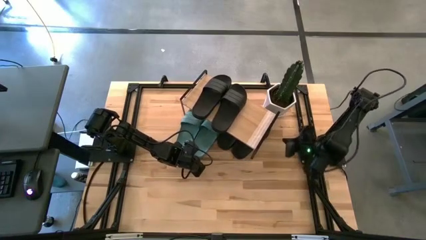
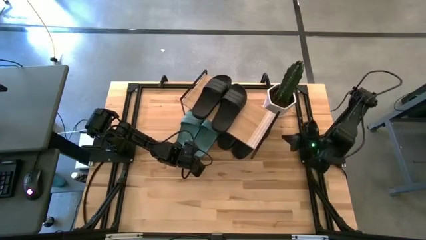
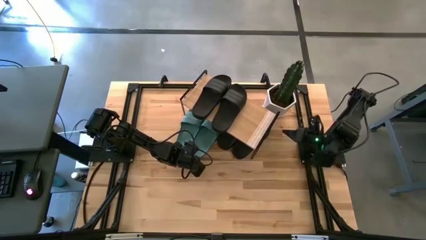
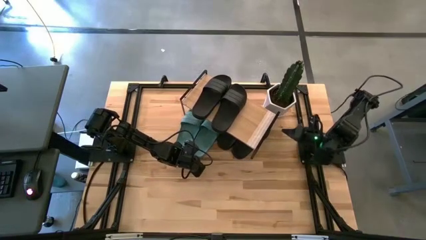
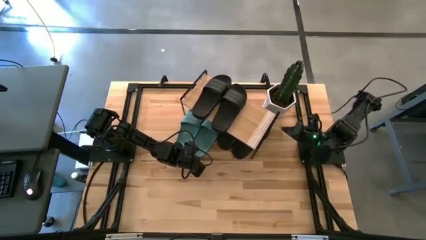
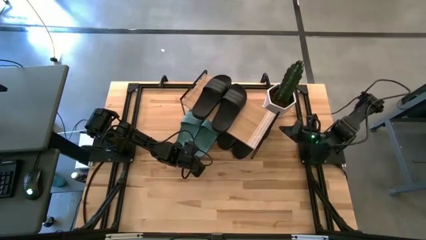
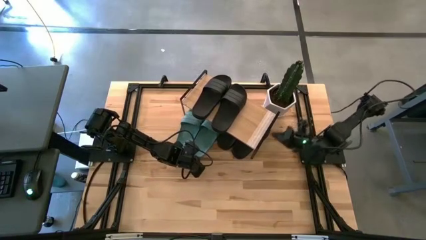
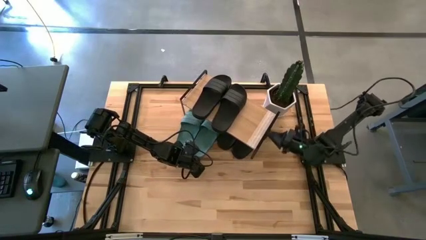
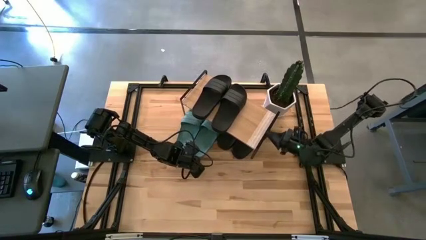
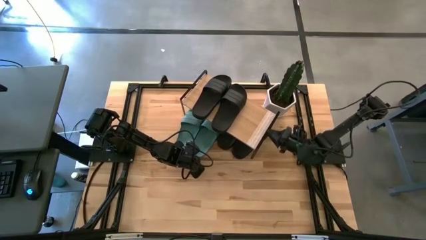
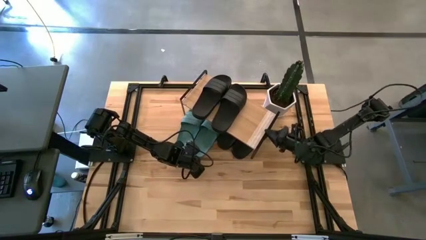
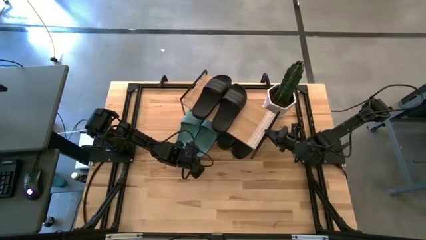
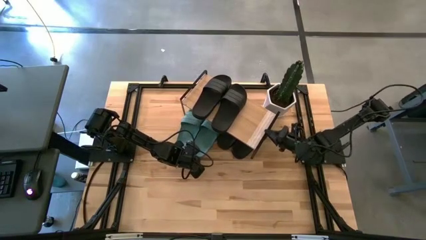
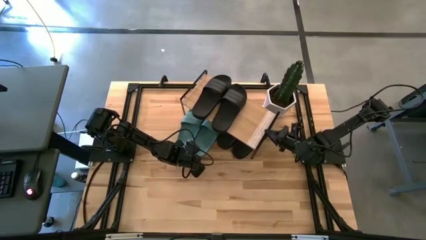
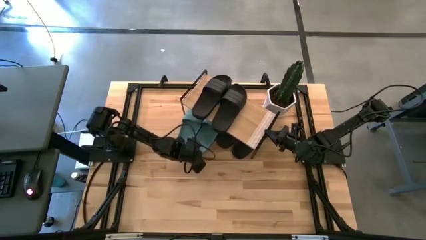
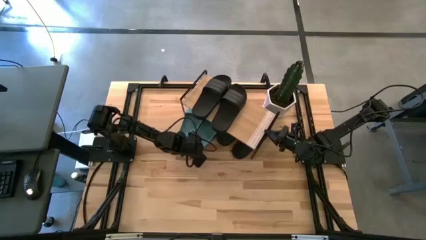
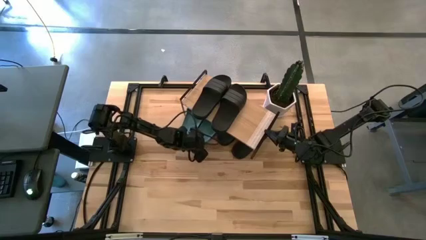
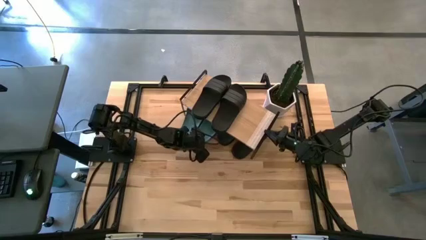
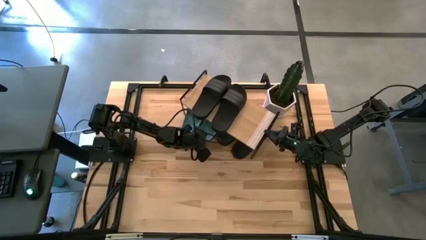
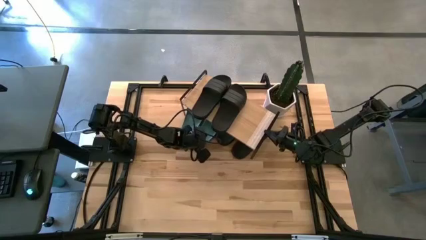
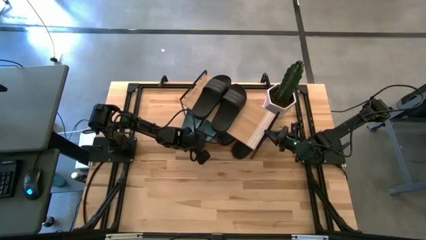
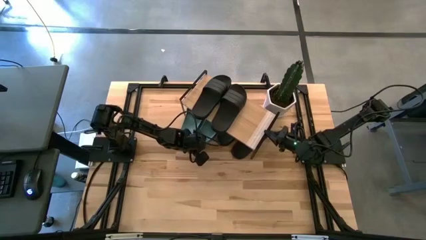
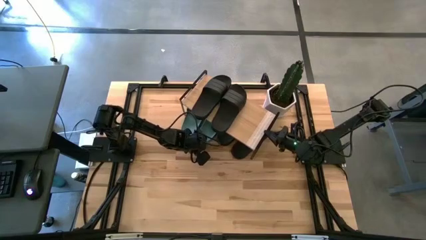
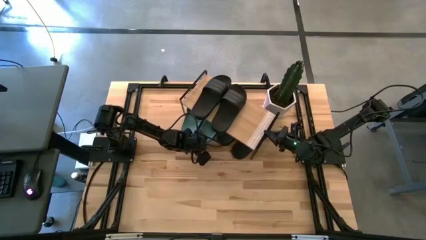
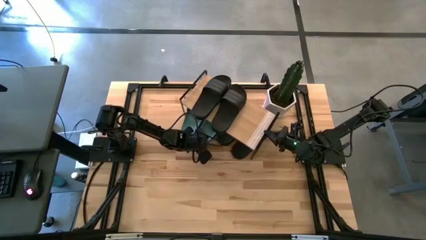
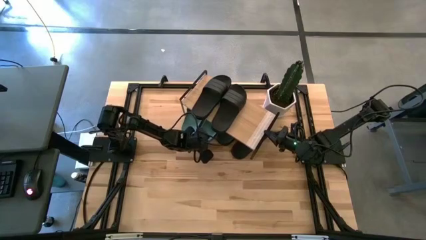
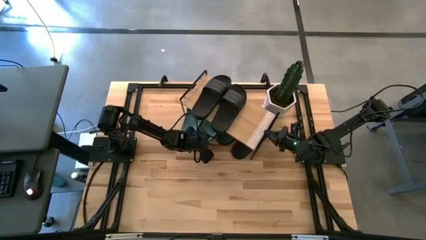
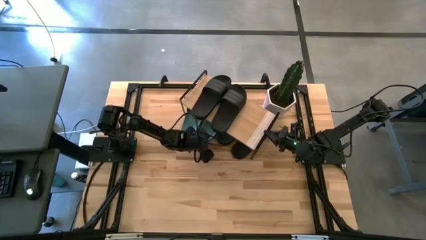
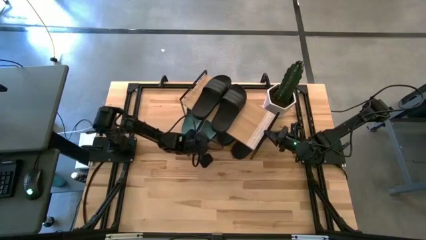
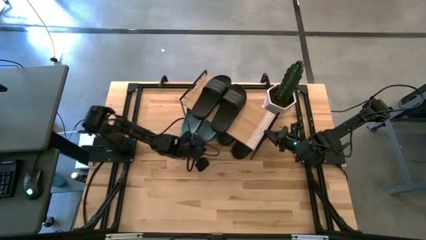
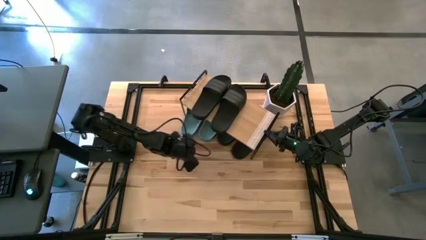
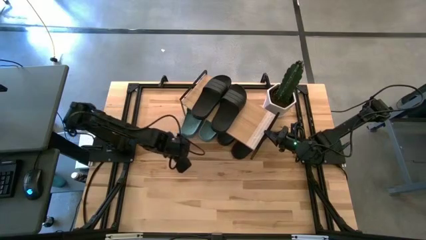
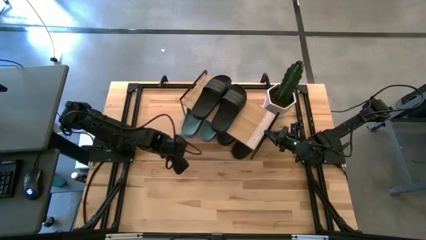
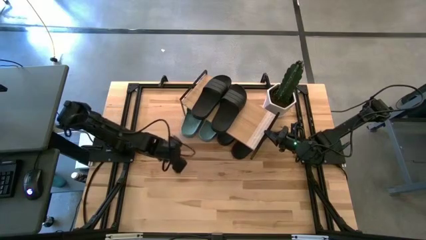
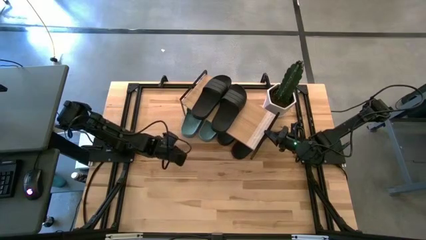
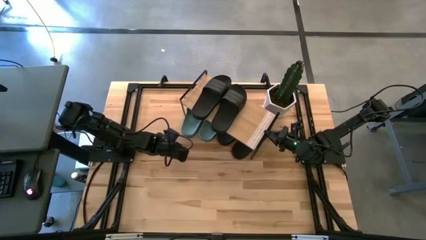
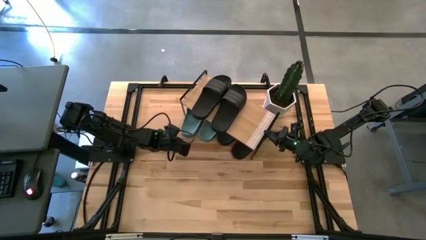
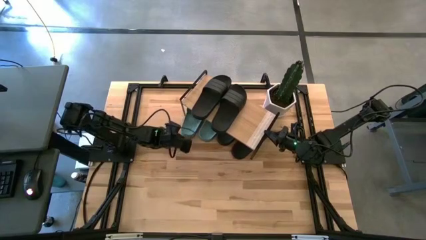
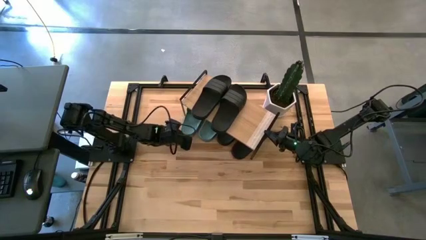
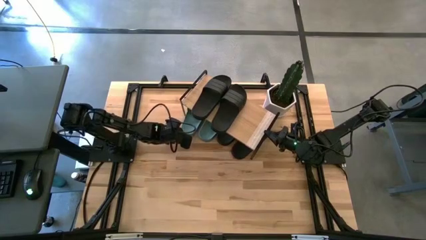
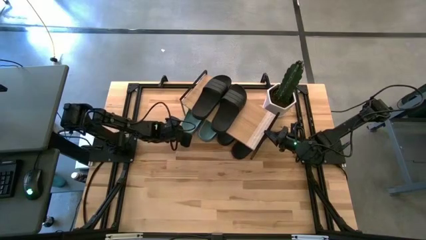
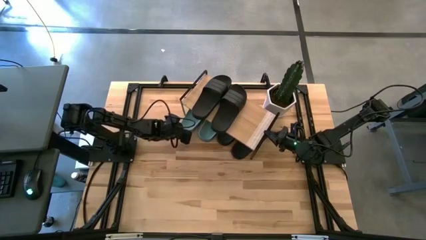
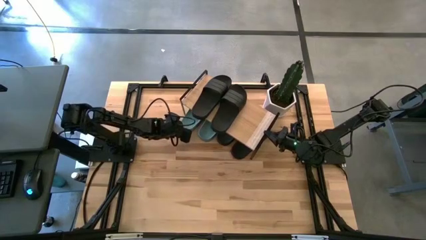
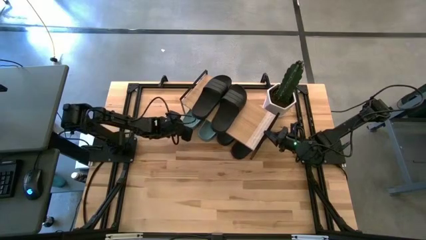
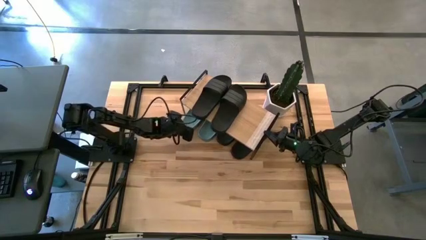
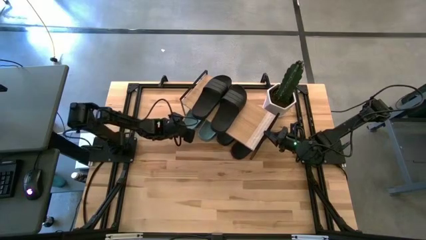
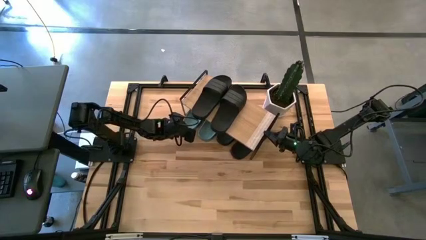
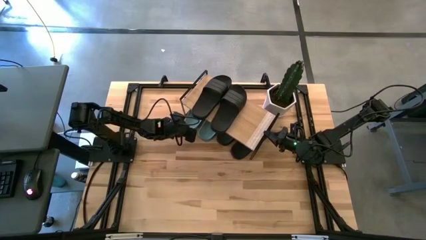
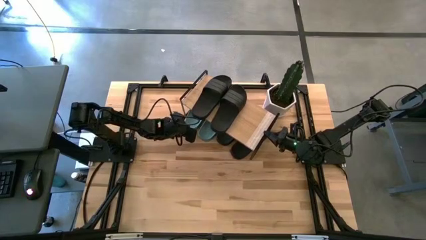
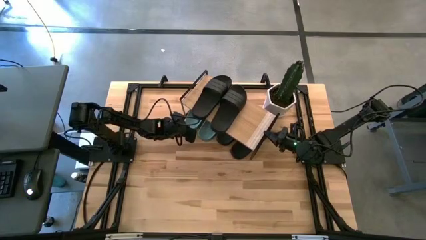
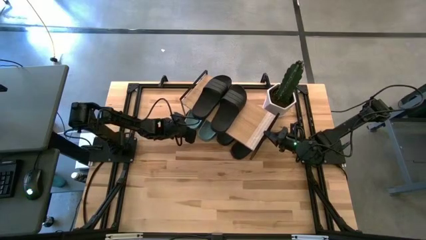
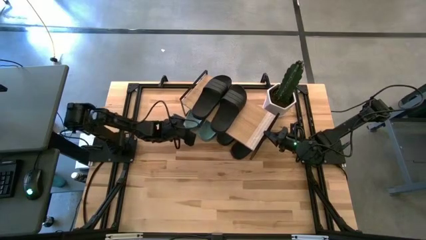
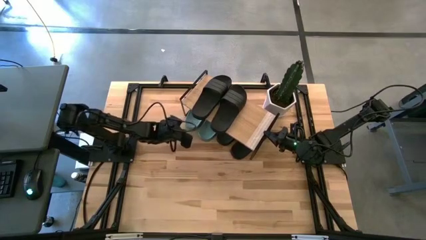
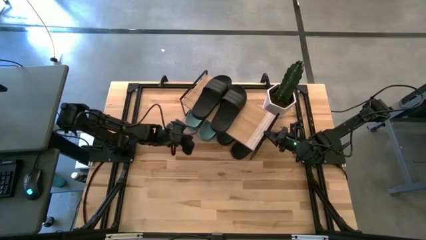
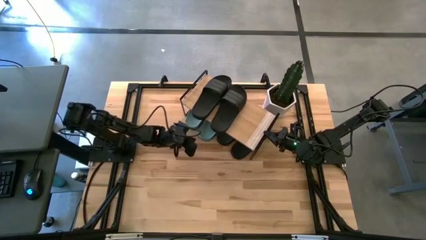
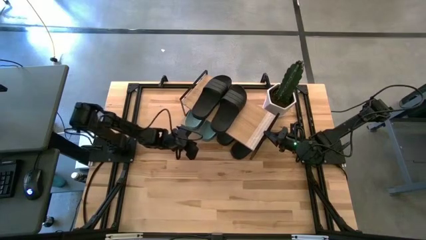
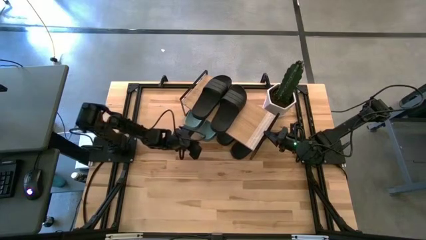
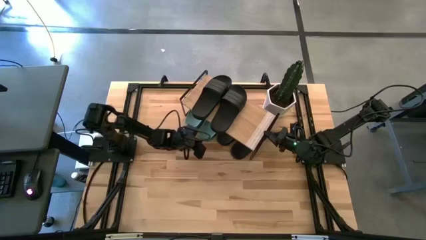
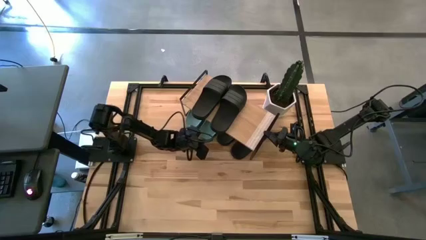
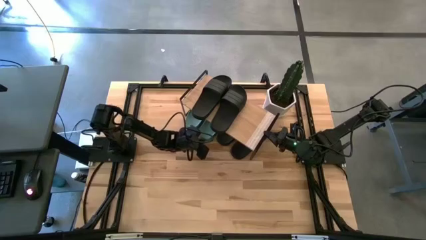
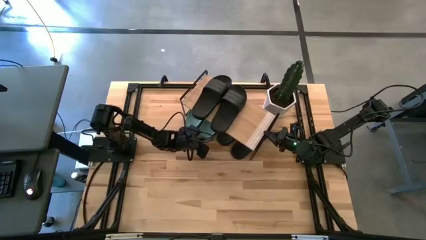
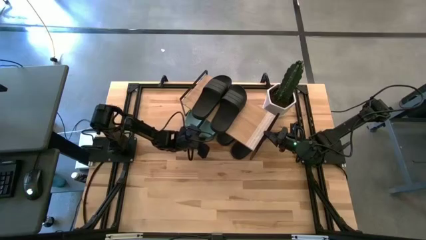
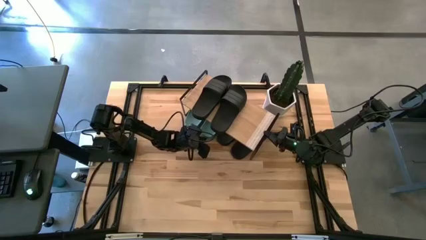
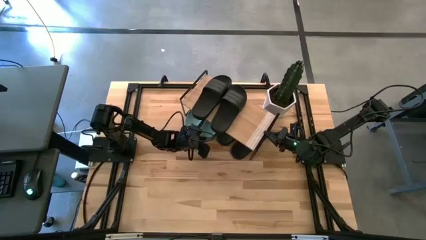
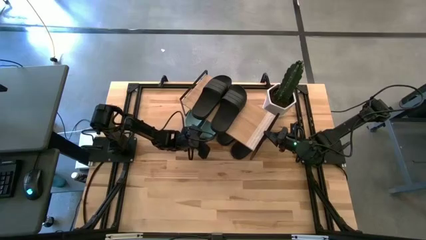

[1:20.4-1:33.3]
Task: Pick and place slides into the shelf
Put the green slide under the shelf

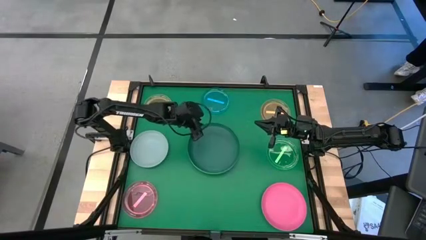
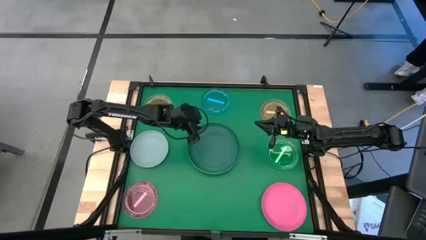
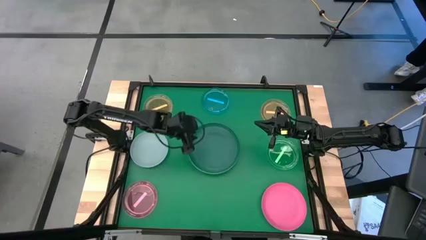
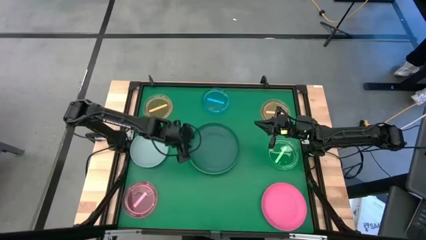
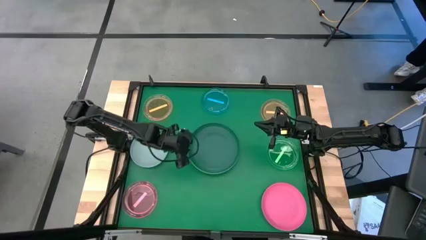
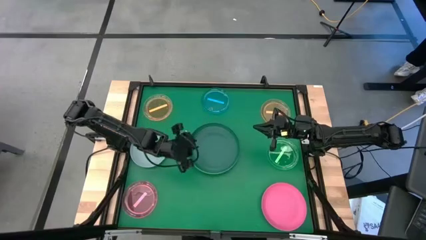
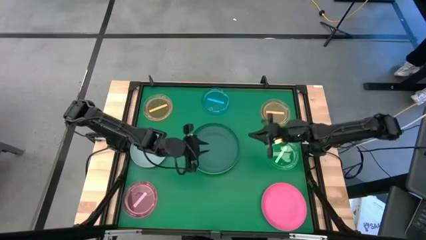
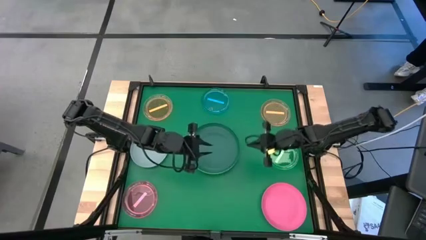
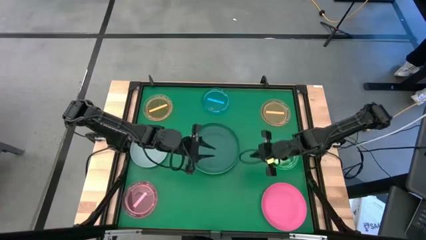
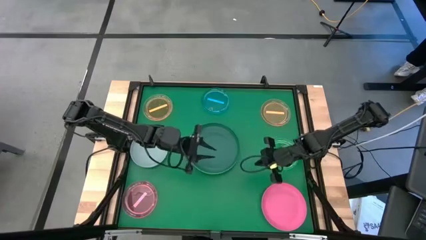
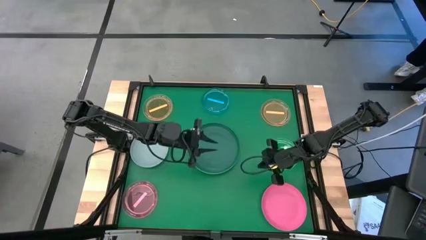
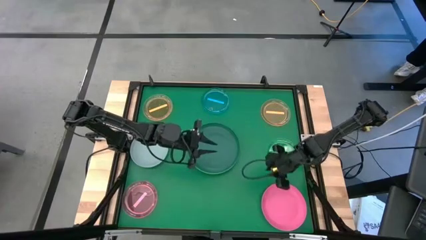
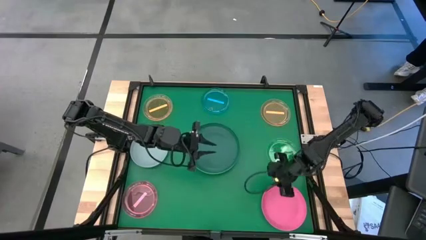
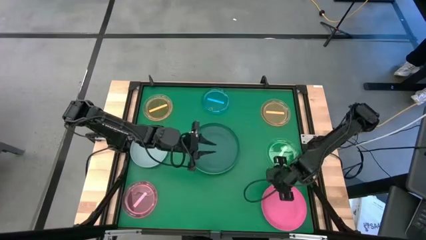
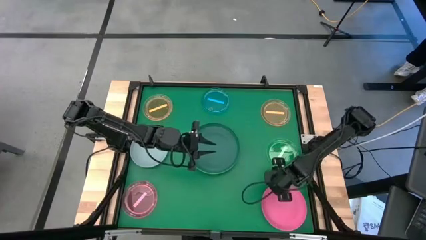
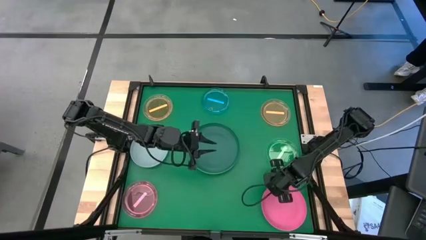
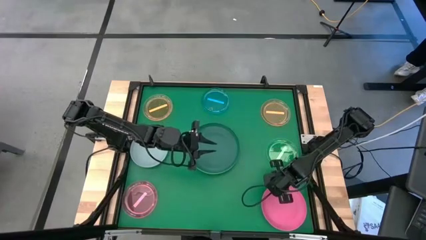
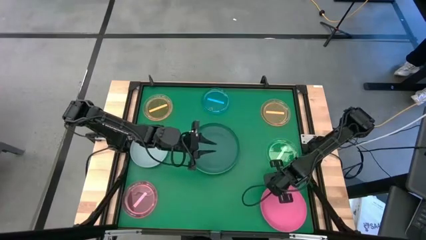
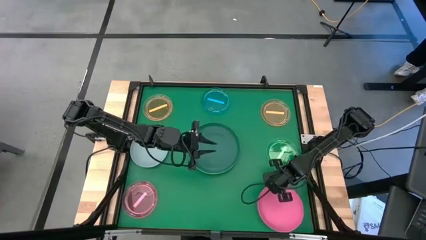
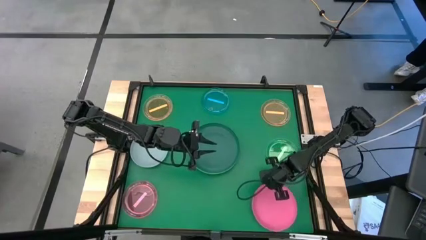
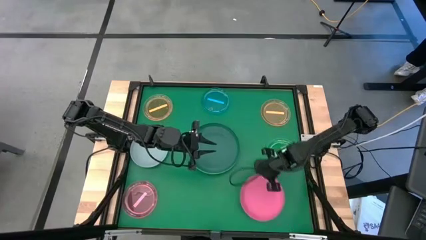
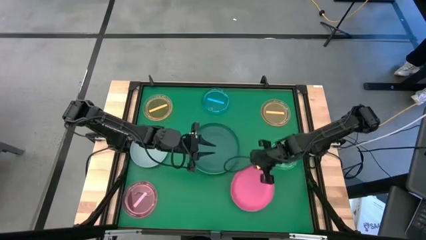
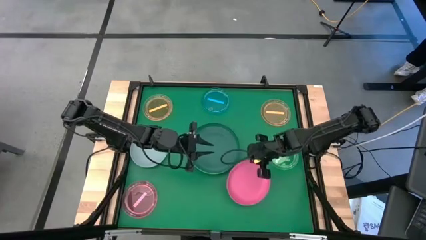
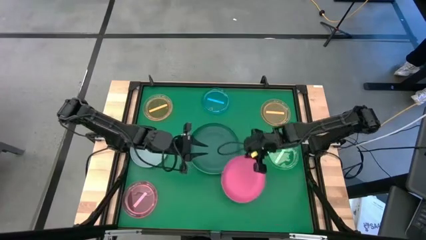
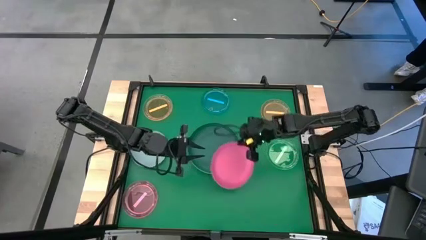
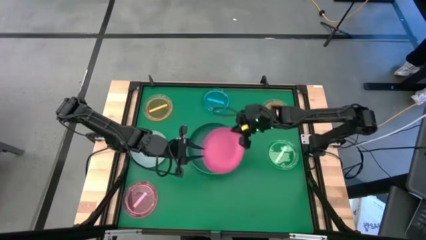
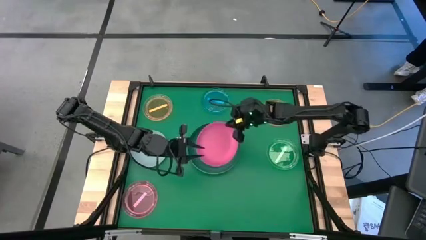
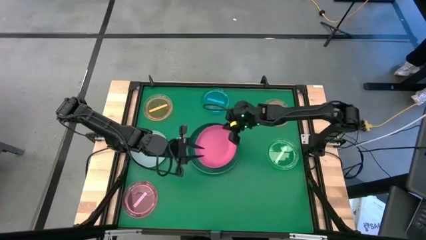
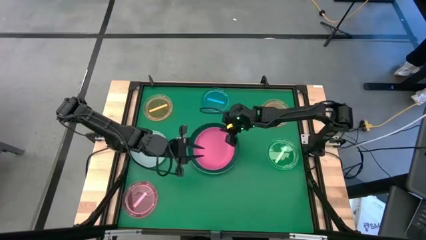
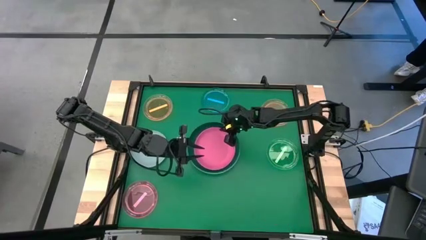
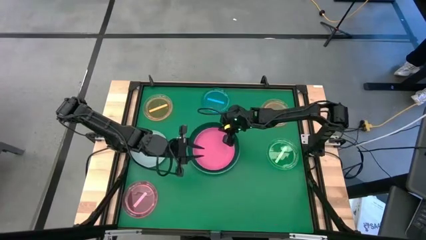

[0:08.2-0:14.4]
Task: Stack plastic plates
Stack the pink plate on top of the green plate
